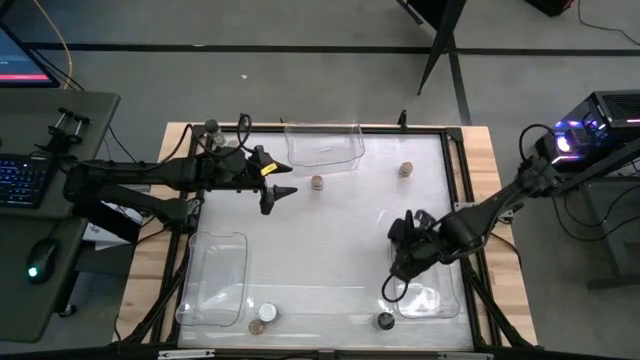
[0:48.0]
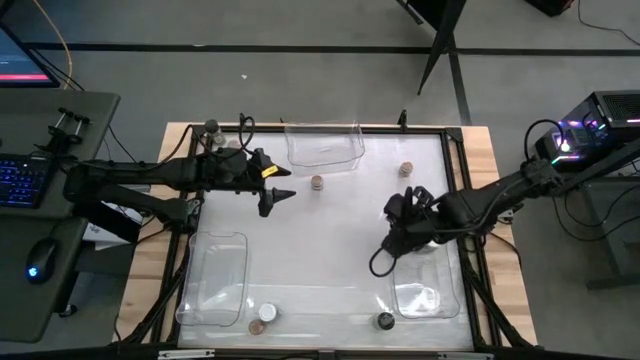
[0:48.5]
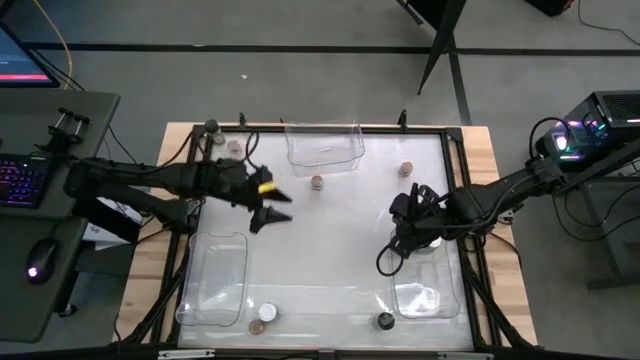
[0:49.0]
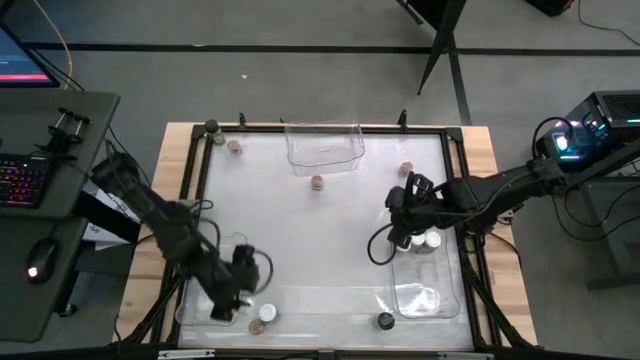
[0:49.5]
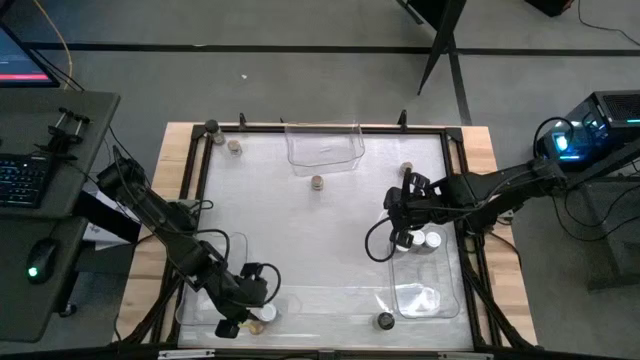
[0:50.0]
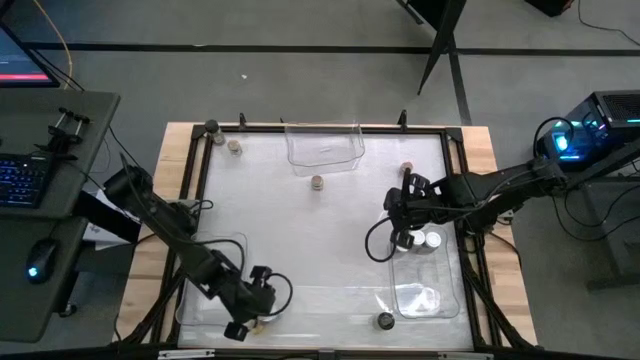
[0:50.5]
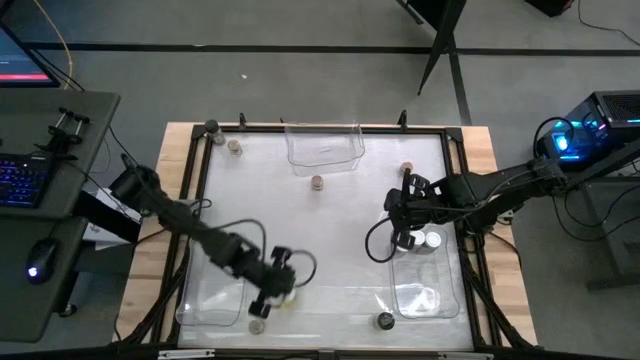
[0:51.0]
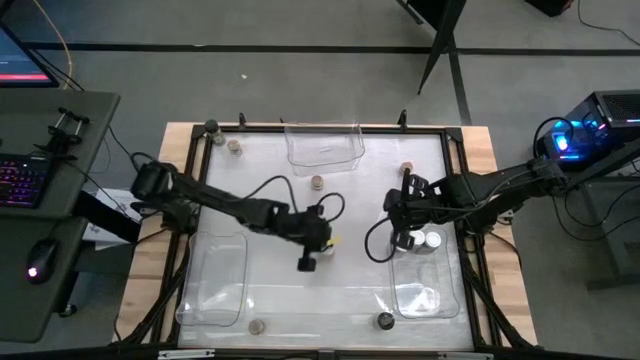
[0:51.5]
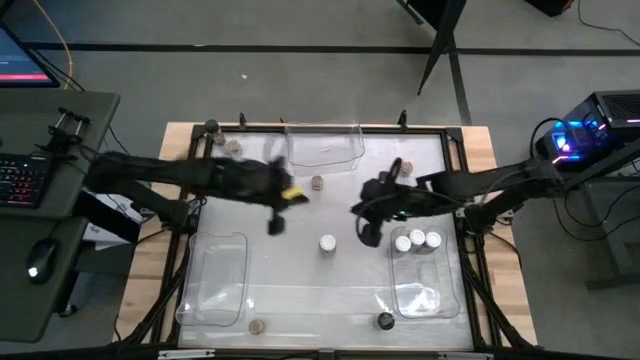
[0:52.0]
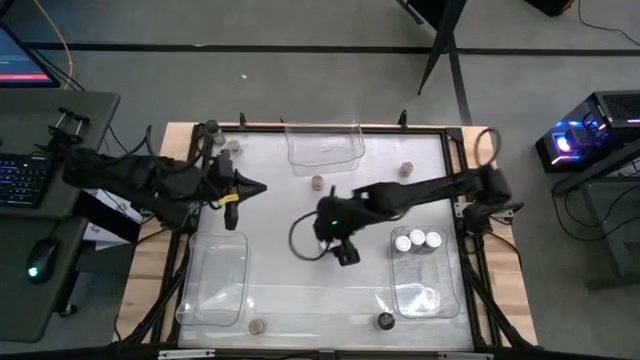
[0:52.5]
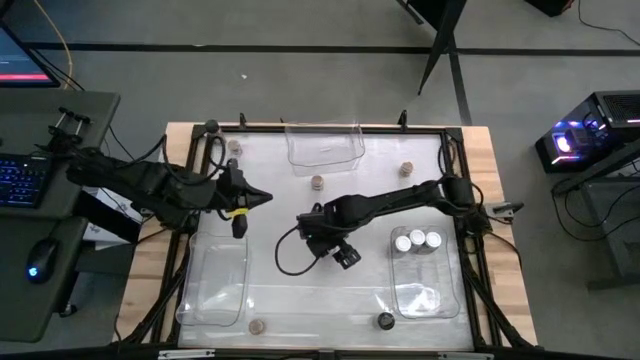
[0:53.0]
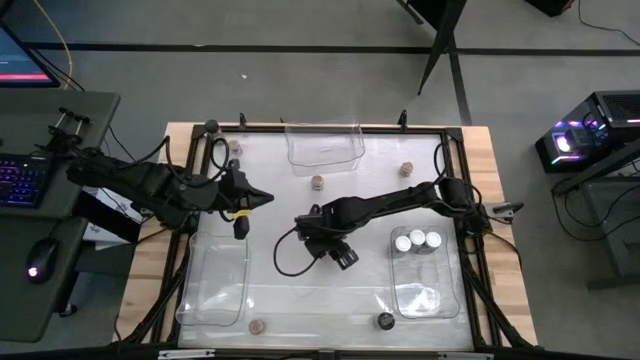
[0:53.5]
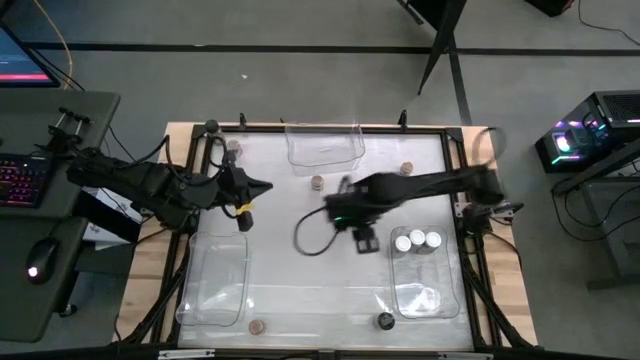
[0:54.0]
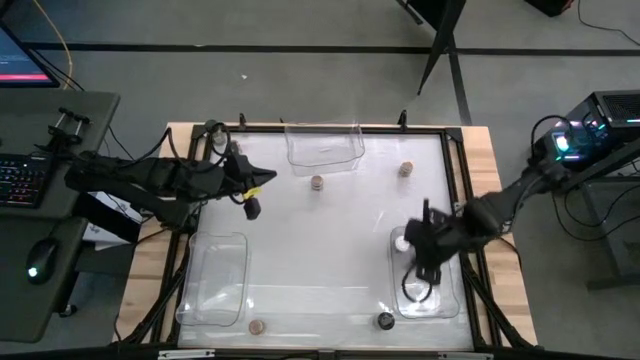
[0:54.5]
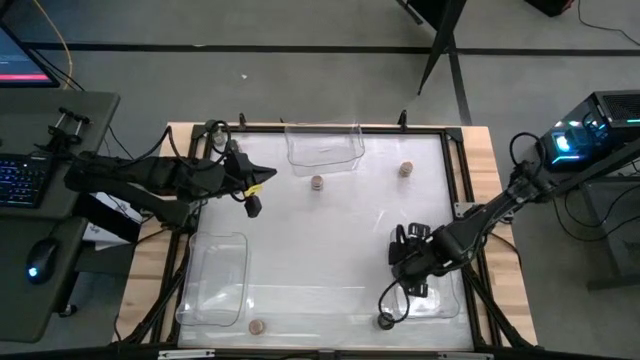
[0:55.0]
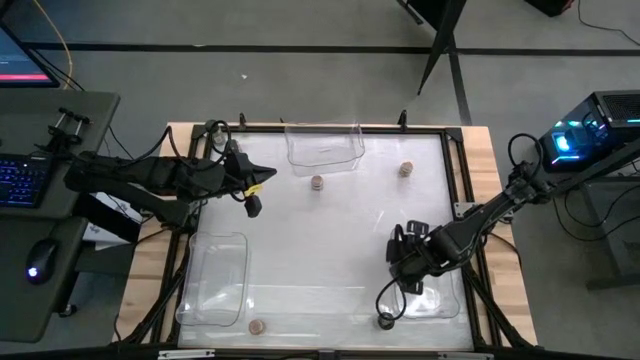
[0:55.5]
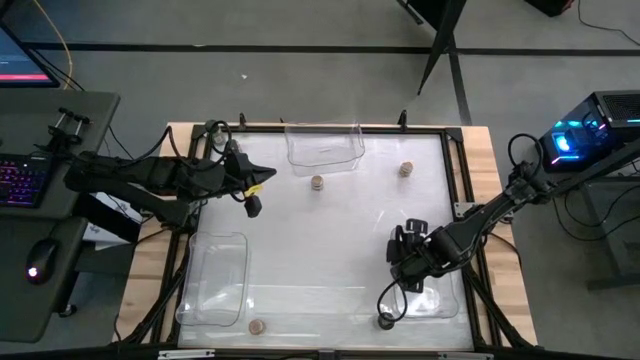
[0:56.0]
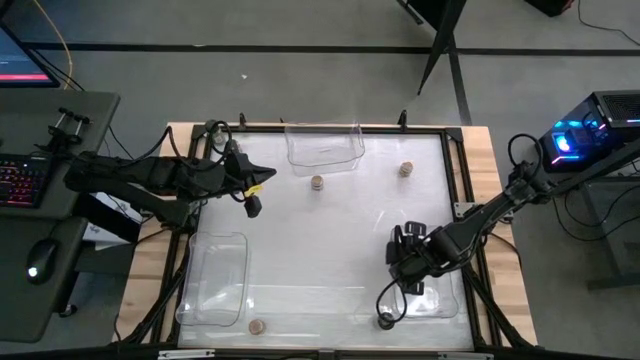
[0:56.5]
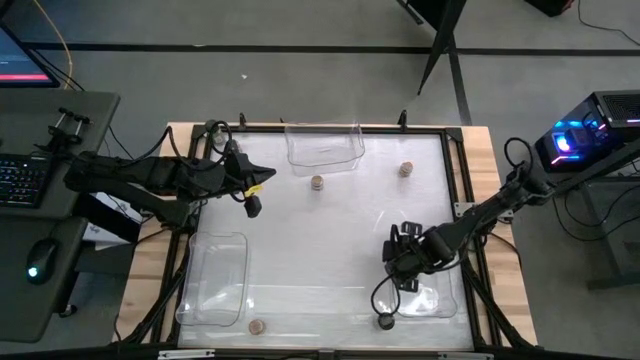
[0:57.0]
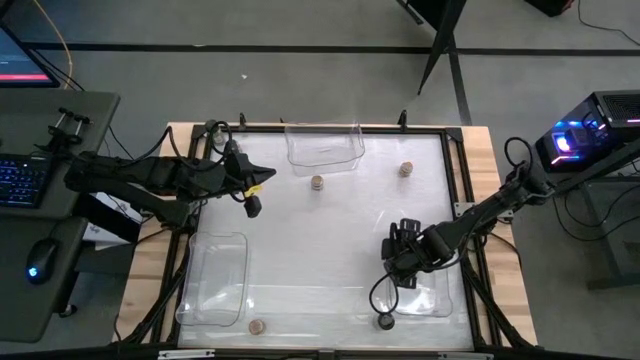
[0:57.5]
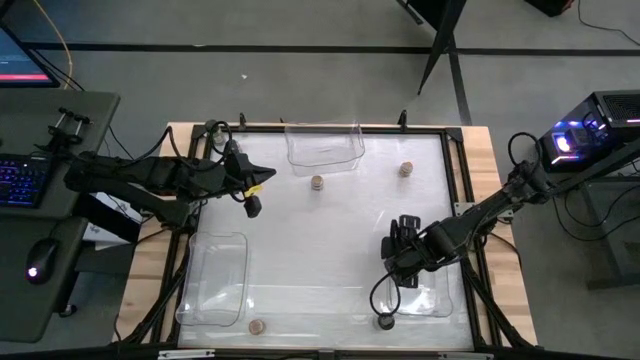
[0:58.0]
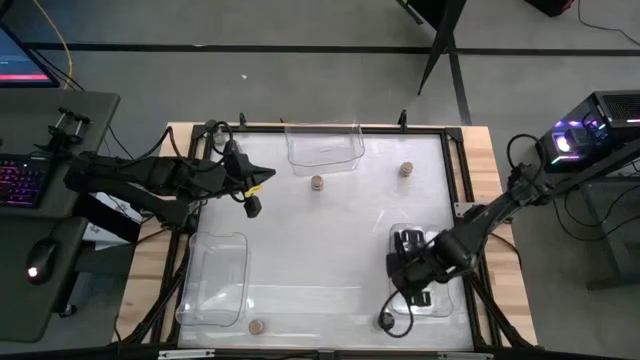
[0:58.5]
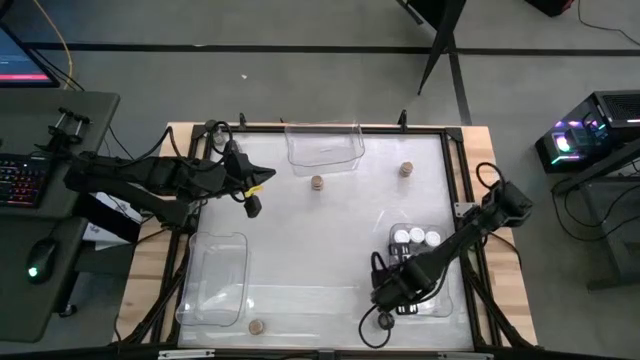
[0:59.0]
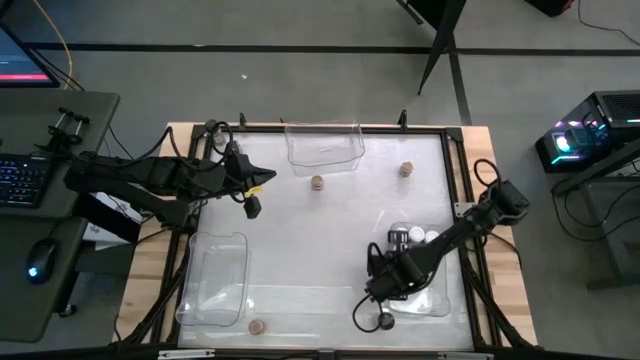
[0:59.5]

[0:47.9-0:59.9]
Task: Sort spices by type
Put the white seasoning bottle into the bottom right transparent bin

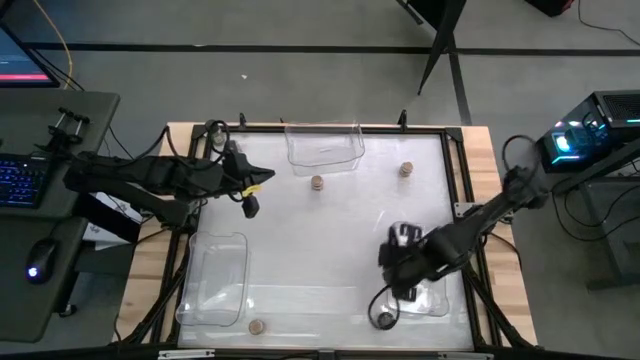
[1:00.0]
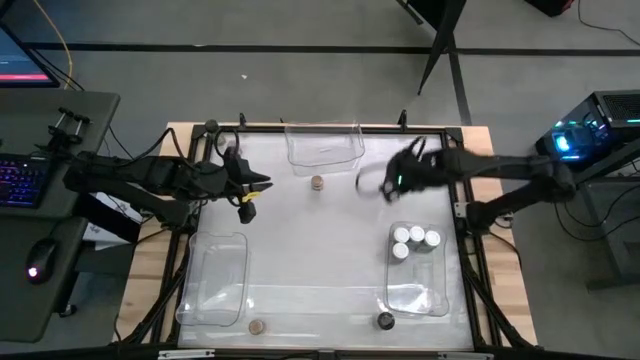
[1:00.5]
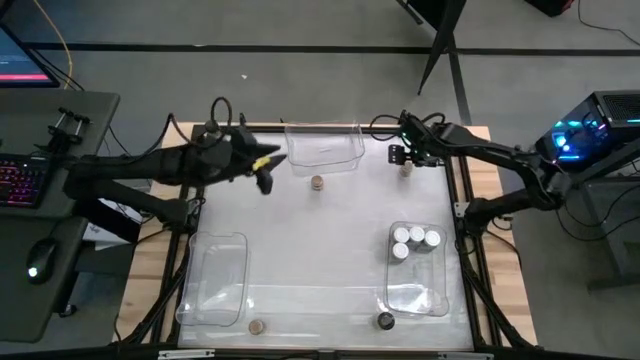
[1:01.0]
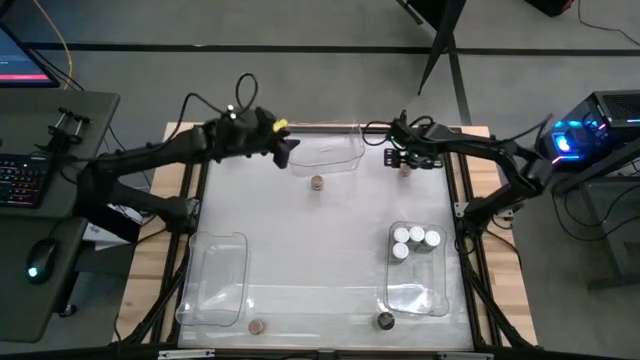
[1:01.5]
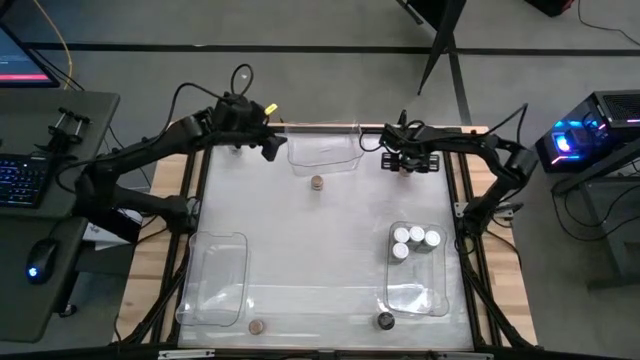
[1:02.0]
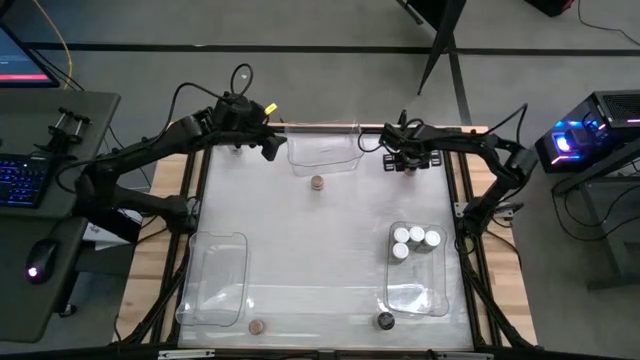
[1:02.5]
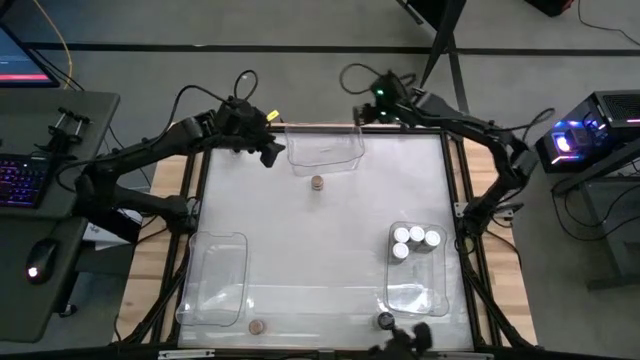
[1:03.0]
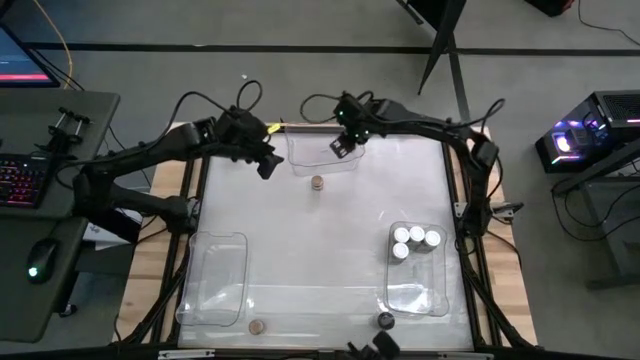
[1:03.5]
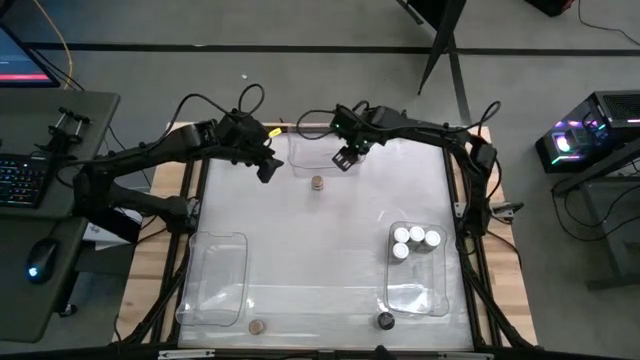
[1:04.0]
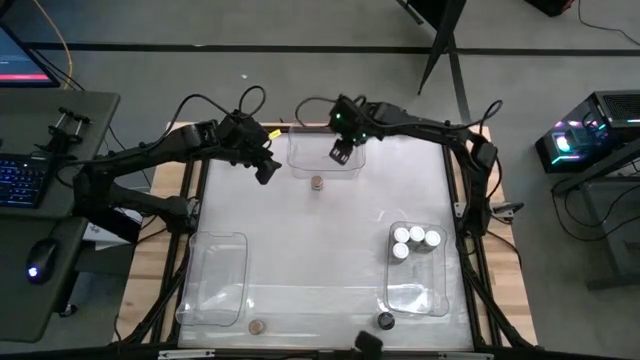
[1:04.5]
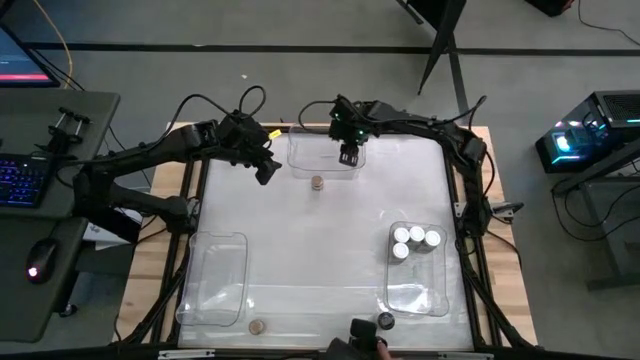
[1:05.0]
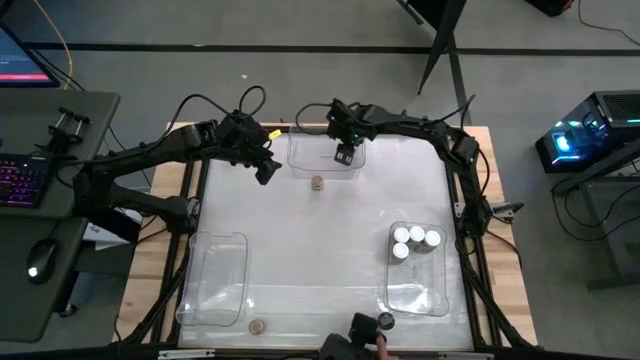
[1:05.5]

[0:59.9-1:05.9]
Put the brown seasoning bottle into the top transparent bin

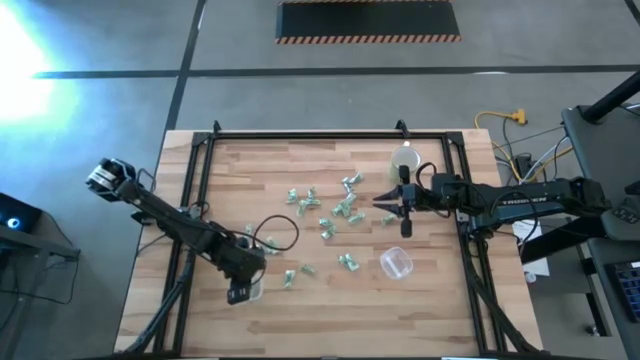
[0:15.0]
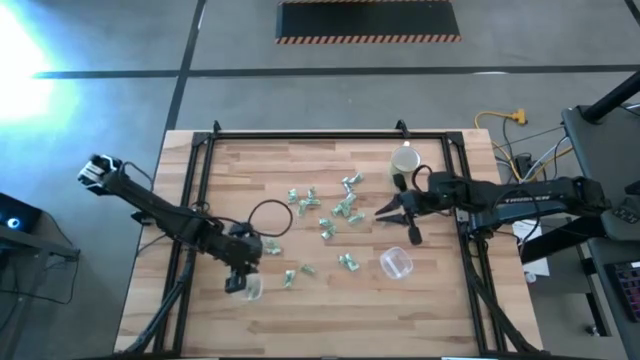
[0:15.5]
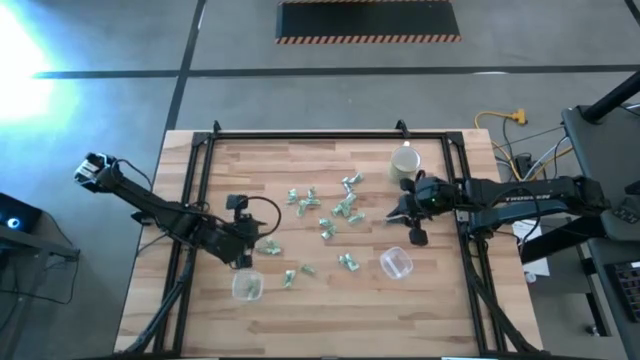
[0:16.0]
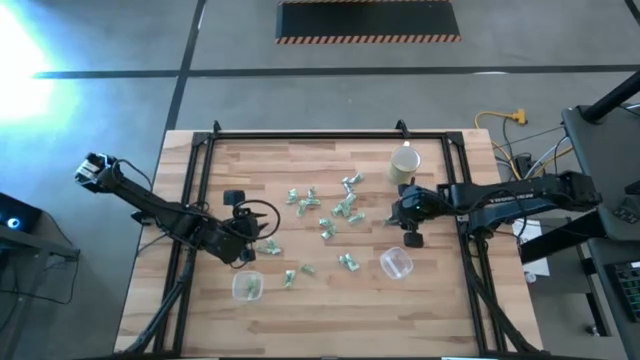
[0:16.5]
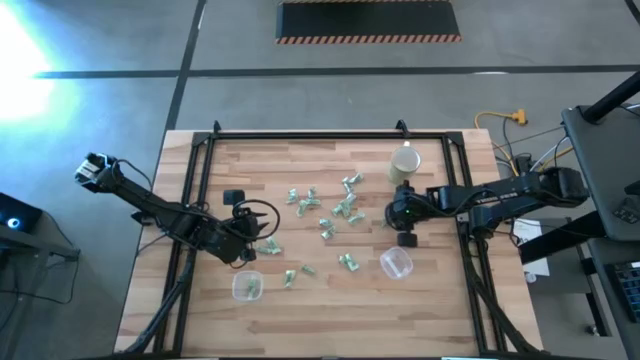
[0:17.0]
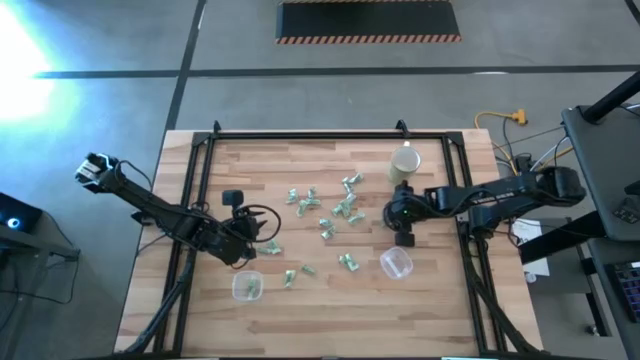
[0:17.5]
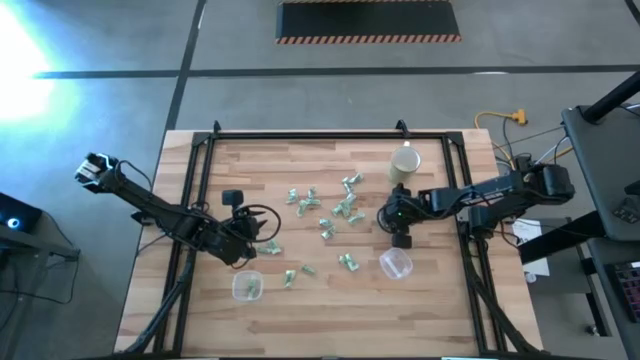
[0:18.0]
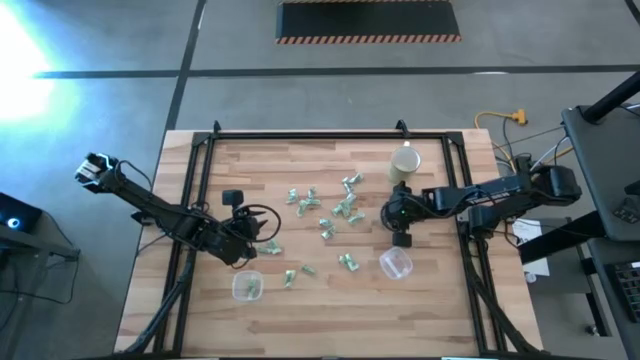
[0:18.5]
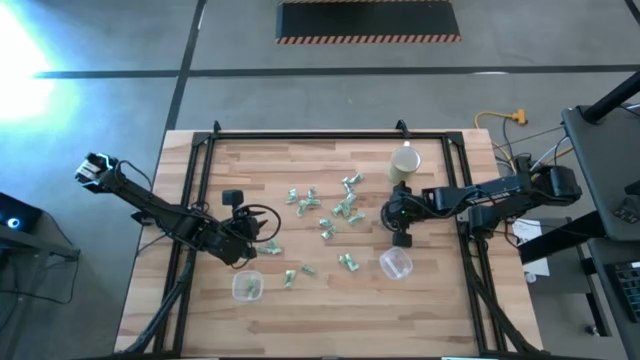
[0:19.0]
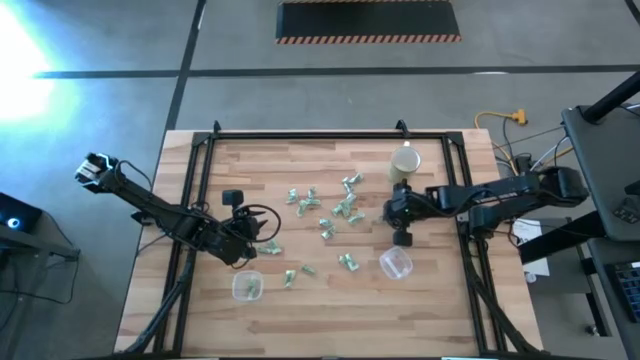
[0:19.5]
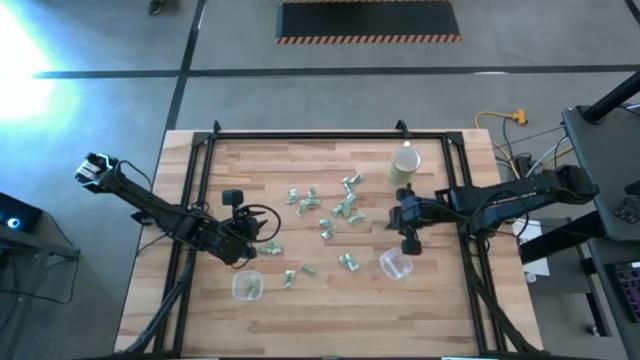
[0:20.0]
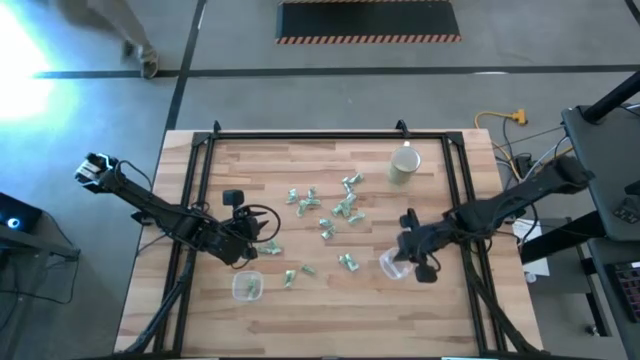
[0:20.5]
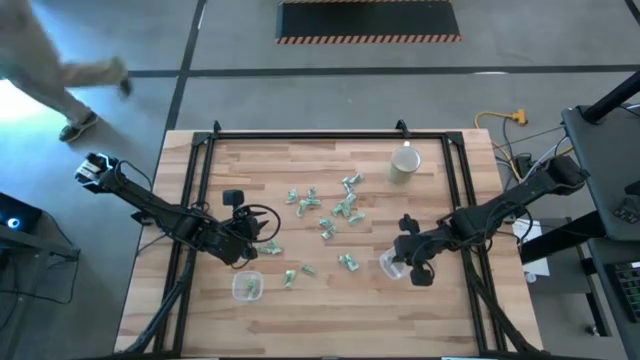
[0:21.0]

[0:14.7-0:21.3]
Task: Pick and place Stevia / Truvia into bins
Put the stevia packet into the right transparent container
